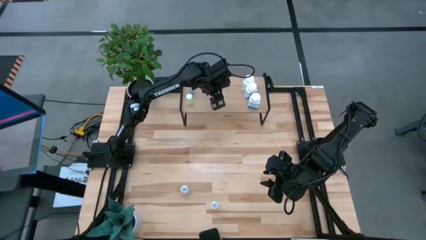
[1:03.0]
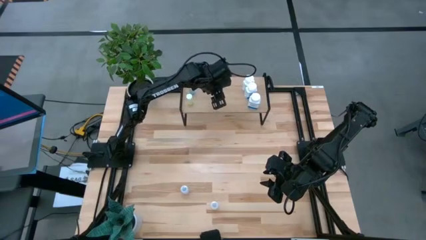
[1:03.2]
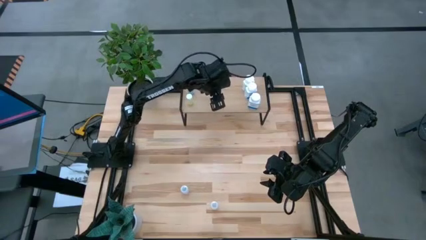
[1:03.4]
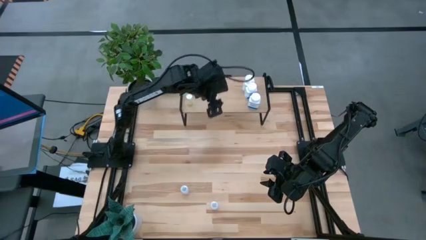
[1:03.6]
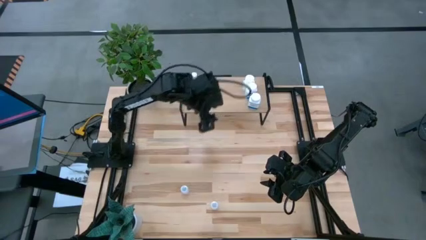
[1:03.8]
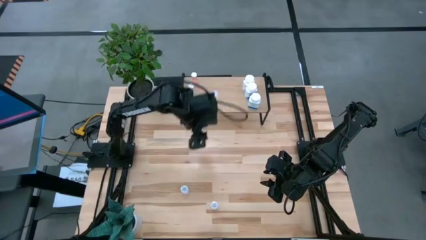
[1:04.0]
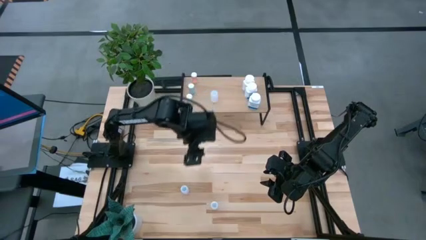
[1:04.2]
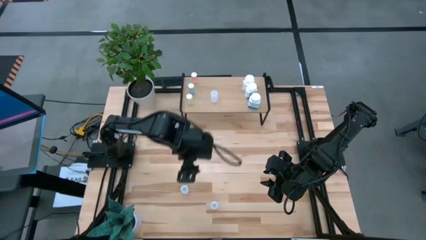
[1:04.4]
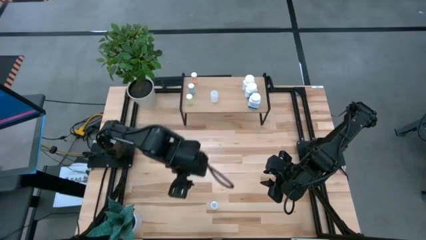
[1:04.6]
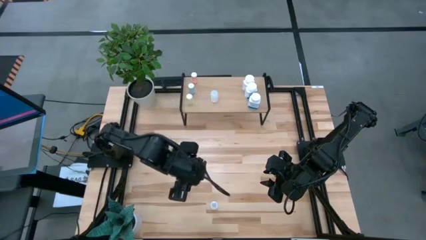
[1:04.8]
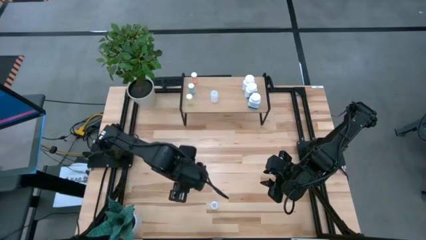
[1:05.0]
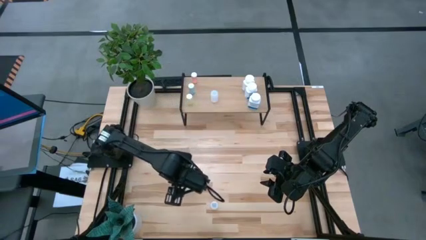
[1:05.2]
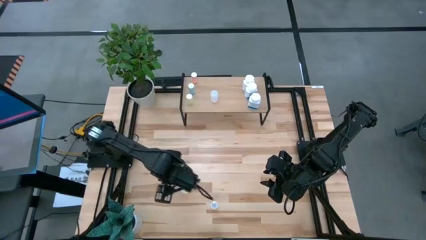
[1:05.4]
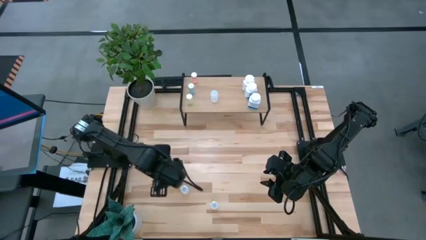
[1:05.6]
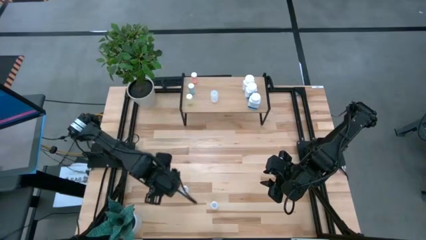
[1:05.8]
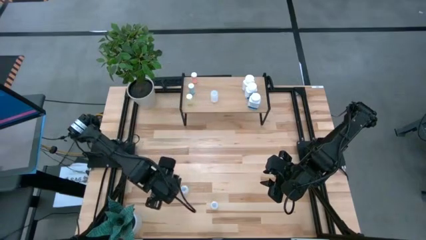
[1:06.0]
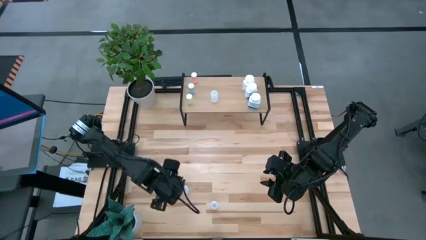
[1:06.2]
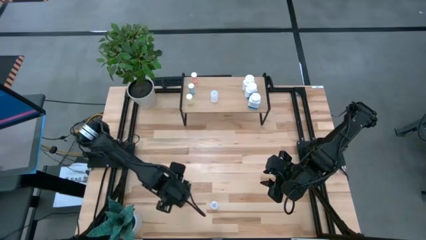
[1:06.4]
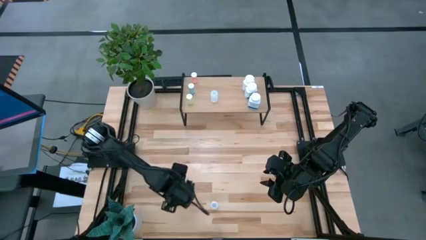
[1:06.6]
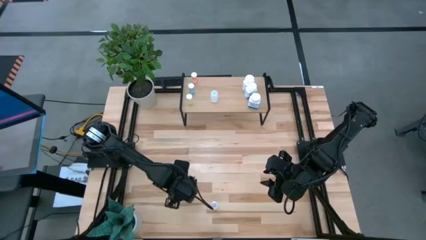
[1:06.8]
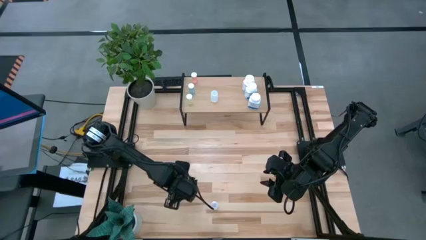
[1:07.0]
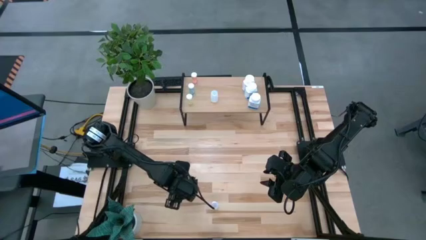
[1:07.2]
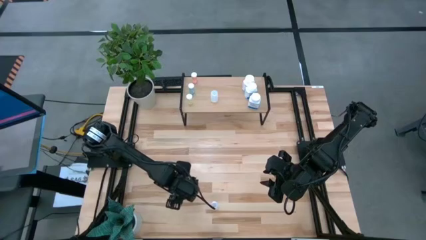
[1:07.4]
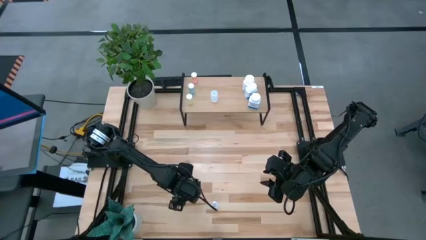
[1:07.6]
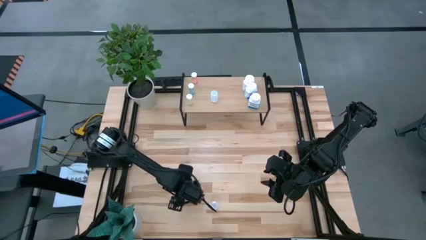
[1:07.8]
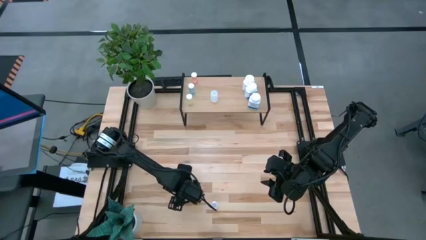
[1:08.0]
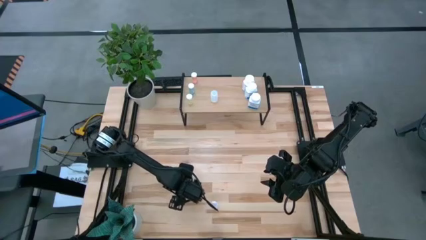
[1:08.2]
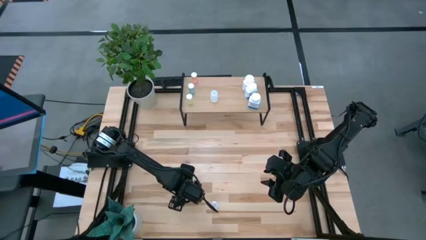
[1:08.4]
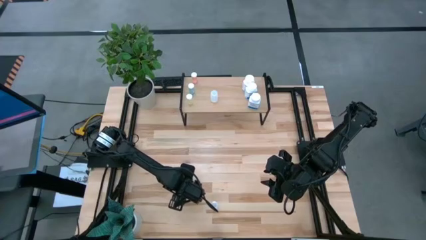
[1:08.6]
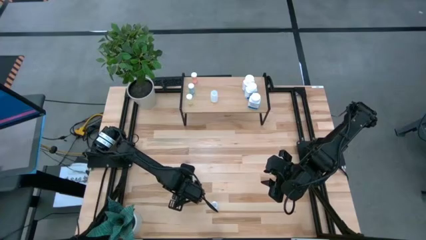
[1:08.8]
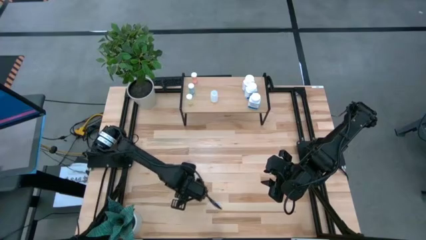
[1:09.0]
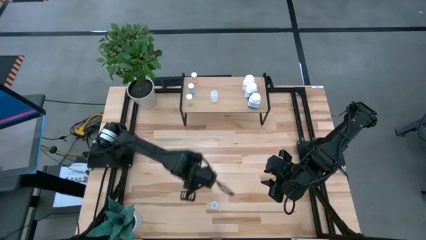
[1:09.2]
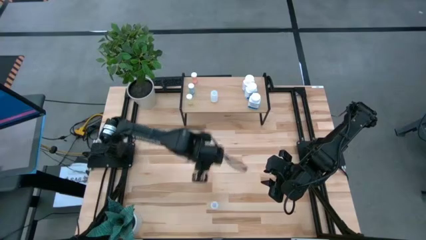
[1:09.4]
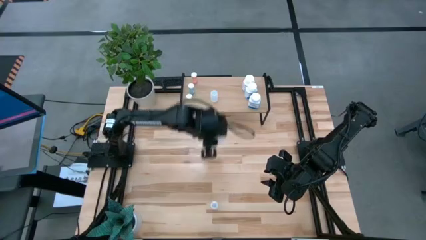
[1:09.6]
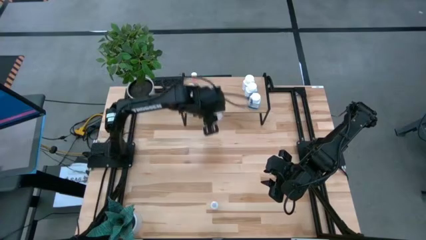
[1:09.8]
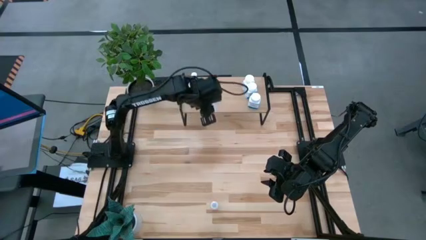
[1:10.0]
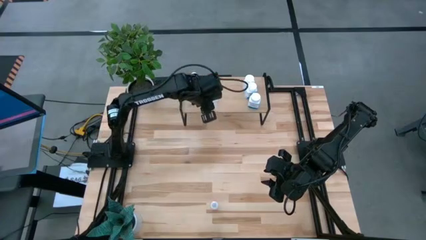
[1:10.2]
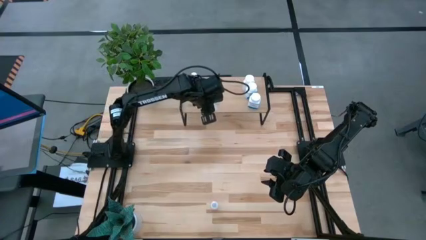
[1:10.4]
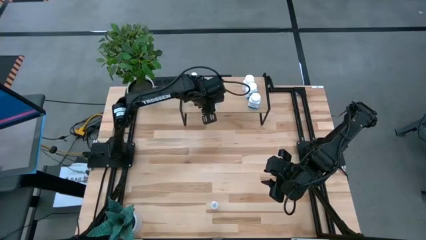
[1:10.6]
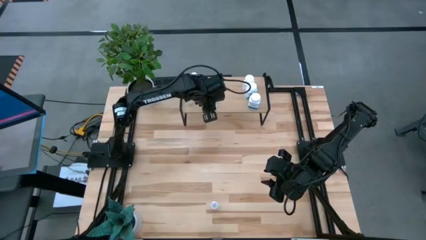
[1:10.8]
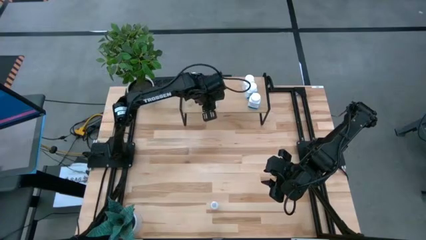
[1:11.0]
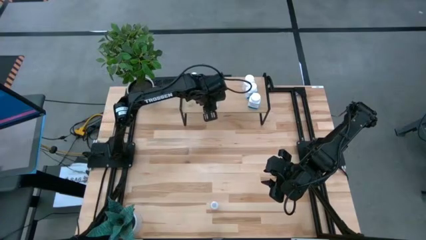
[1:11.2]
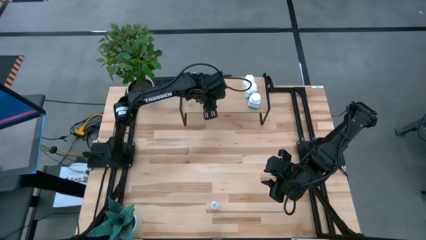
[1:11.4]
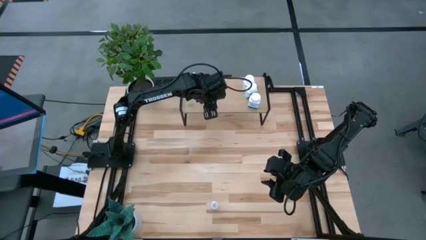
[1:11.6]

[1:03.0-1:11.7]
Task: Pick and place medicine bottles onto shelf by color
Put the left transparent pill bottle on the shelf

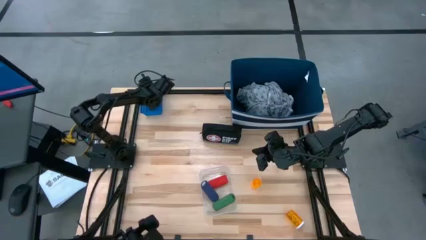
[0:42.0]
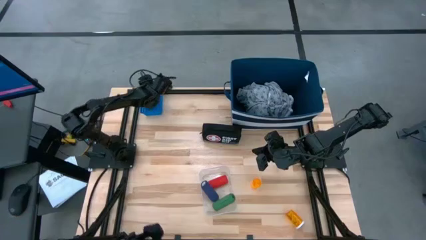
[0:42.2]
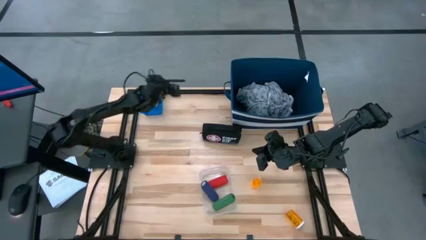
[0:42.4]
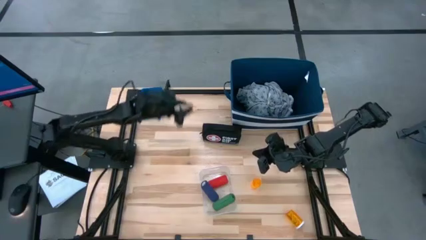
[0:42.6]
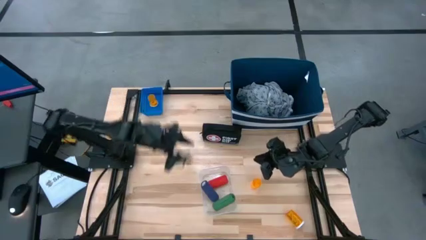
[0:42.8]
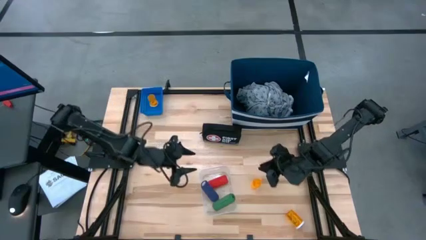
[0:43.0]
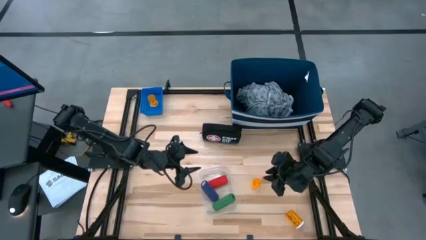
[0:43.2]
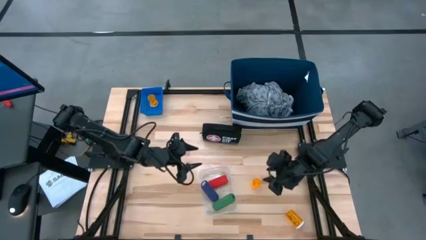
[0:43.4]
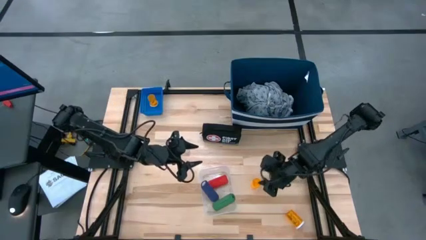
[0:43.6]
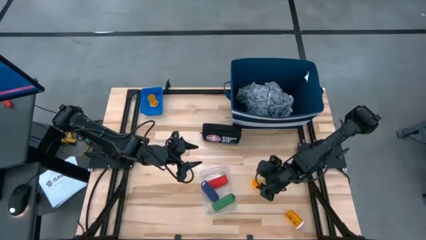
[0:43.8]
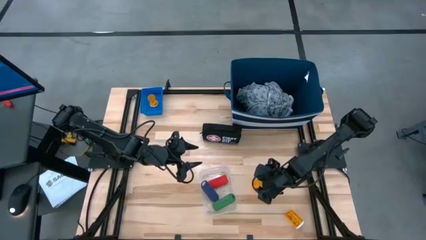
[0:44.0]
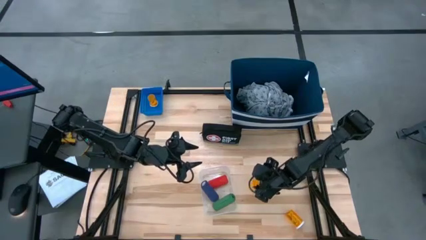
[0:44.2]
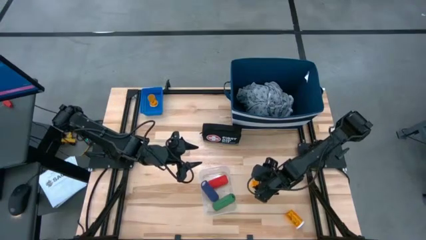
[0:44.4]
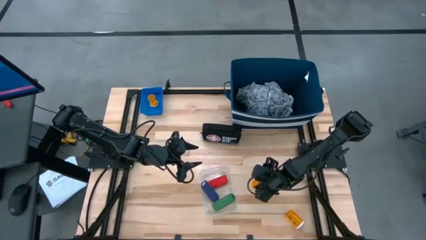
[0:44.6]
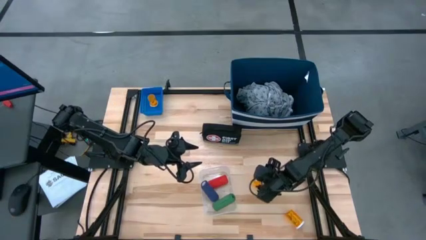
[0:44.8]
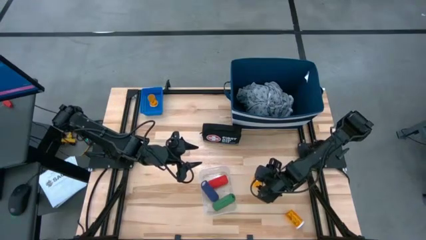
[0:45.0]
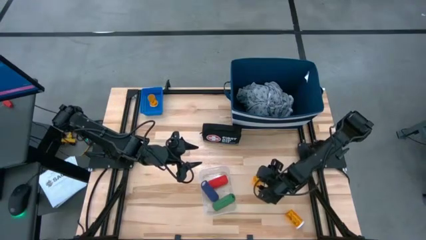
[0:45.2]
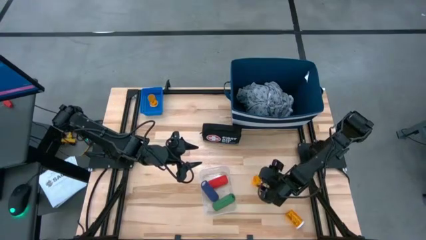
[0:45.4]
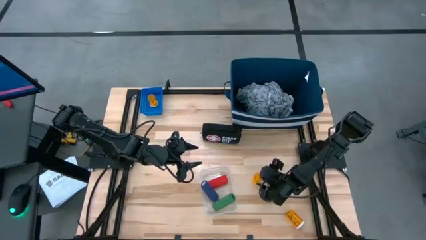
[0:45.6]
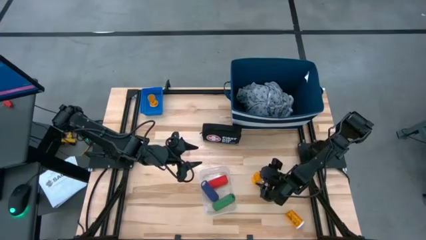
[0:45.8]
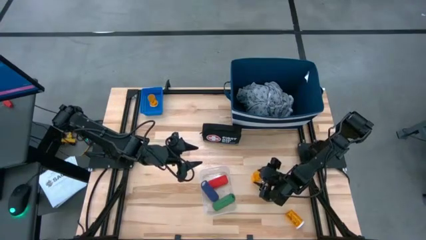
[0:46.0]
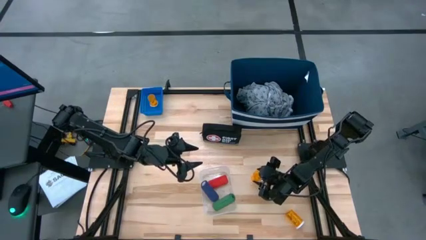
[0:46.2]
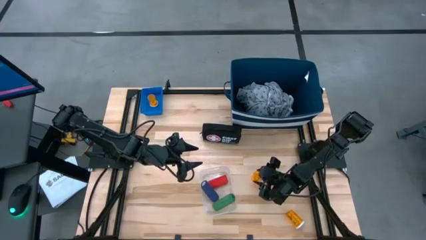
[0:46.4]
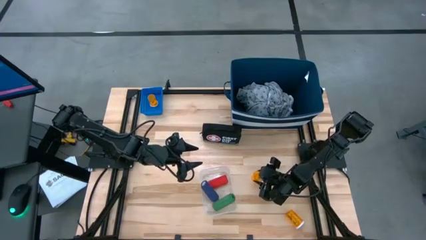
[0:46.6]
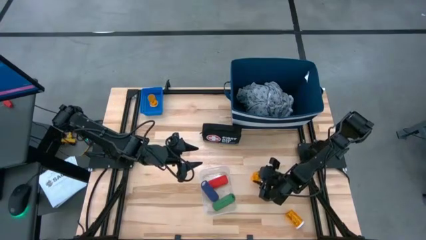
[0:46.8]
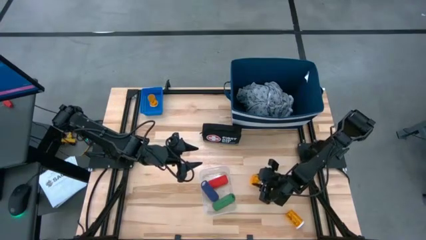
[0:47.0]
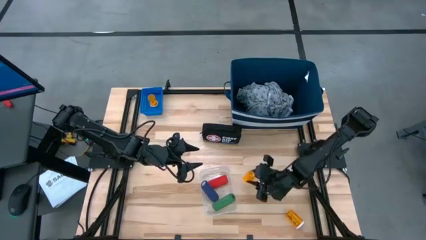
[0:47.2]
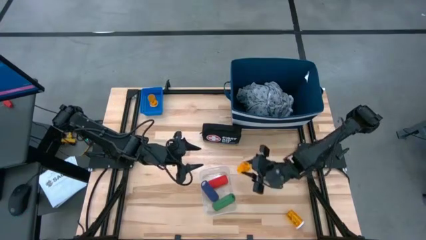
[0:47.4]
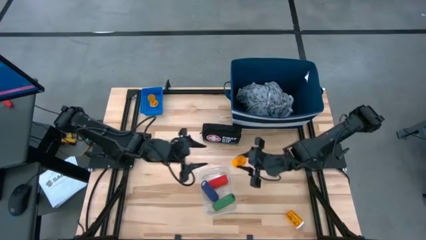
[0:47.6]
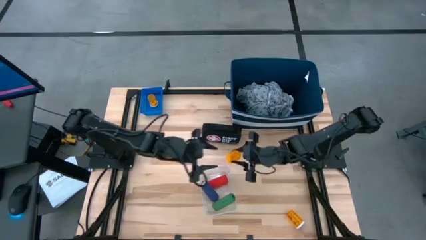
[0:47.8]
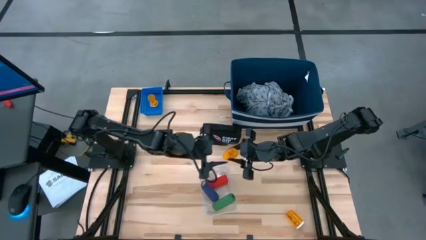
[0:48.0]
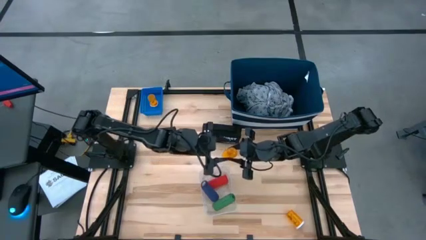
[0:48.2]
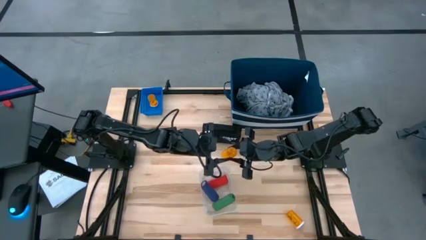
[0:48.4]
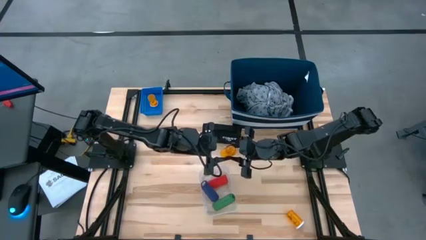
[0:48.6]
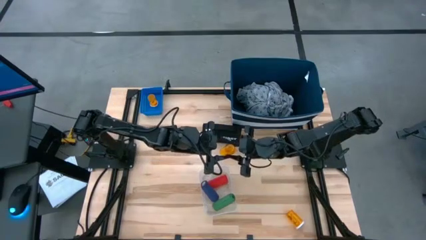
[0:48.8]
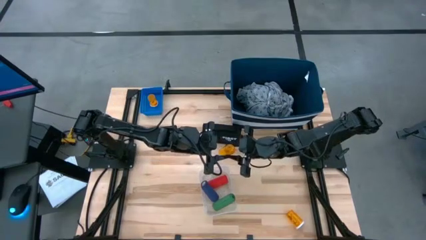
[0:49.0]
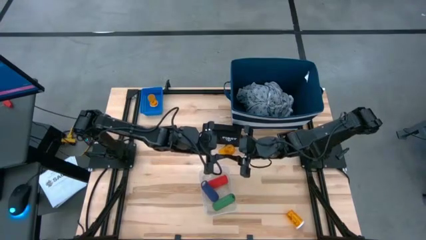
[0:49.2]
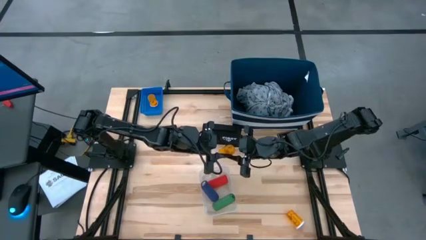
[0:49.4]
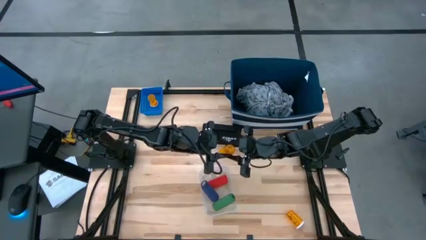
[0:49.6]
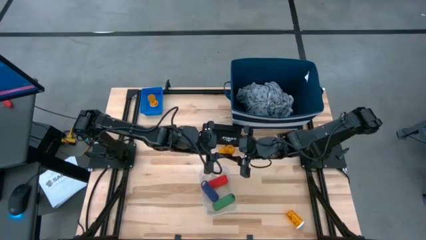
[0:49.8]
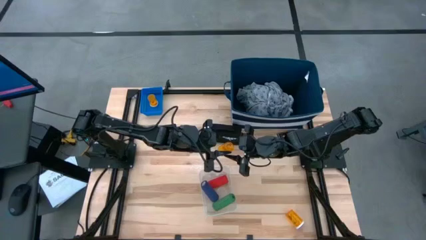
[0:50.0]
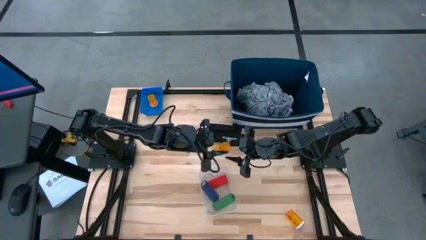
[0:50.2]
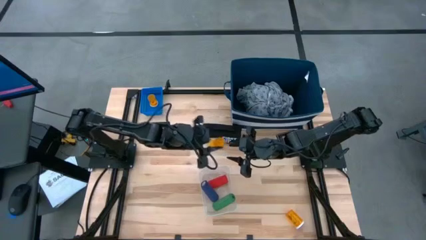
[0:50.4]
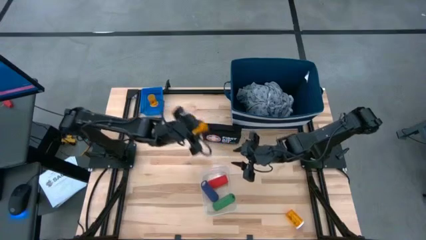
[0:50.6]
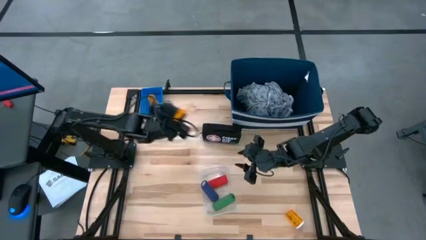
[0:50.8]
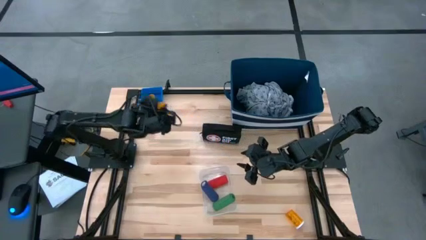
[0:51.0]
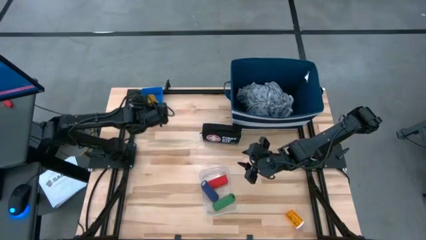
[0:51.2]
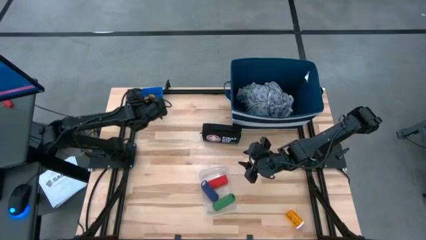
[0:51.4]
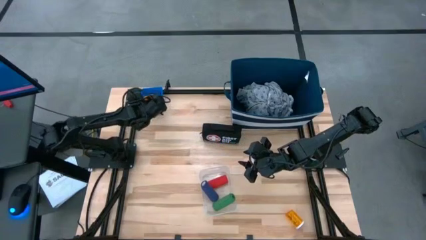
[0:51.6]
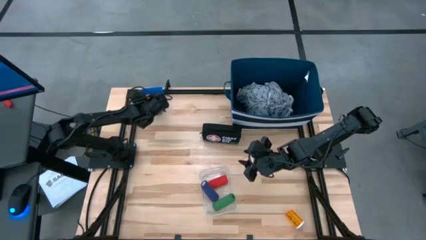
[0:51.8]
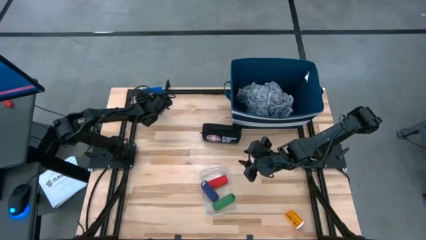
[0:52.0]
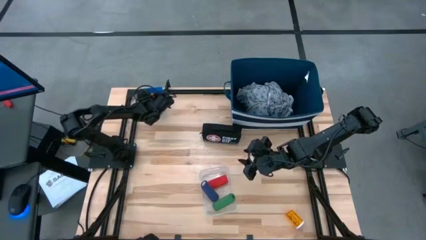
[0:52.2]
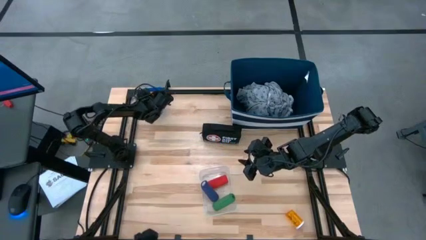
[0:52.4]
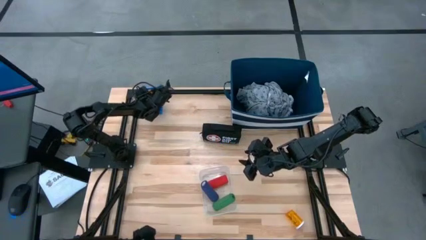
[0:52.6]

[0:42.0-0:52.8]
Task: Pick & place medical supplies in basket/bin
Put the top orange pill bottle into the blue bin
